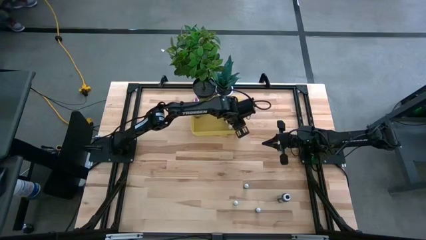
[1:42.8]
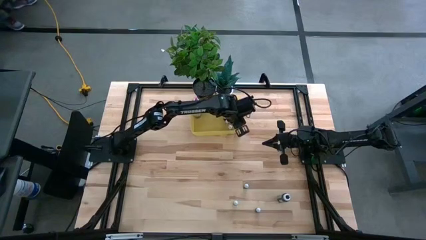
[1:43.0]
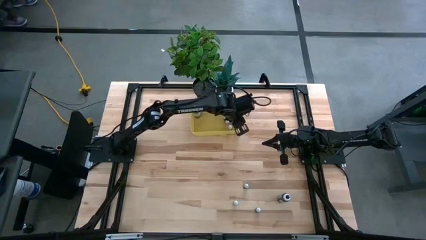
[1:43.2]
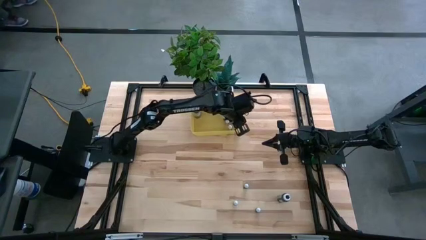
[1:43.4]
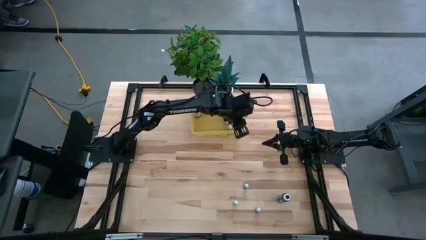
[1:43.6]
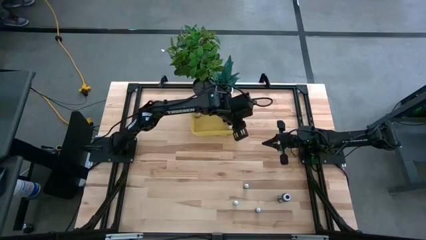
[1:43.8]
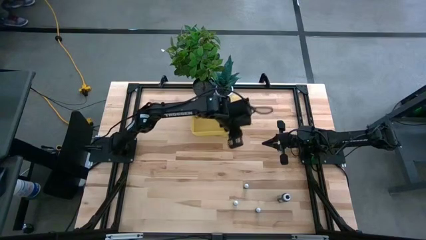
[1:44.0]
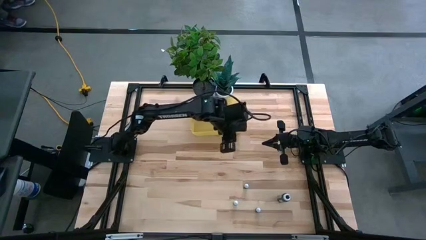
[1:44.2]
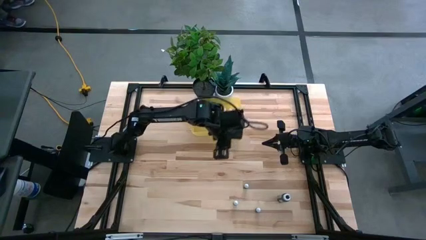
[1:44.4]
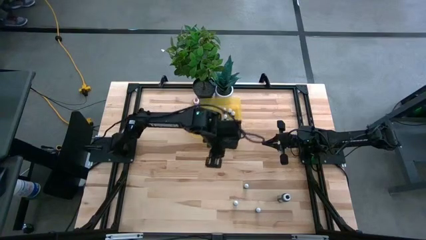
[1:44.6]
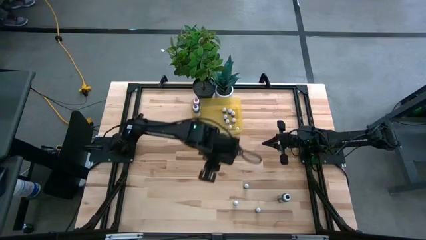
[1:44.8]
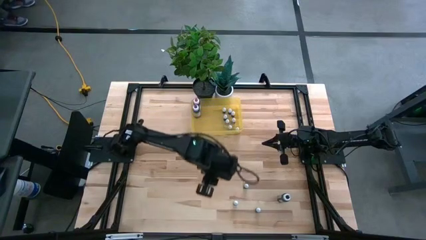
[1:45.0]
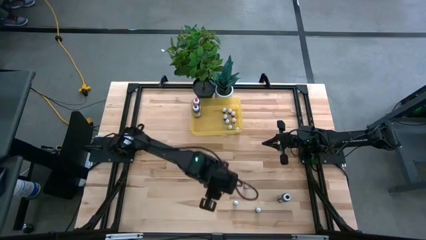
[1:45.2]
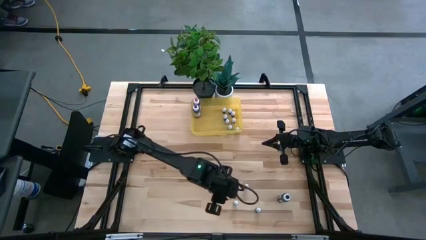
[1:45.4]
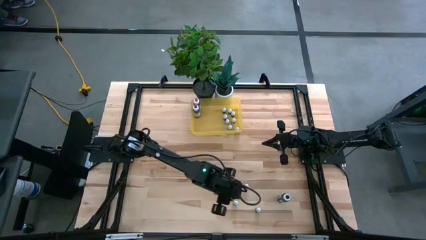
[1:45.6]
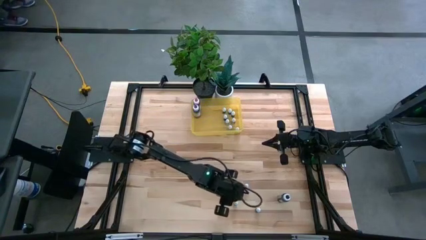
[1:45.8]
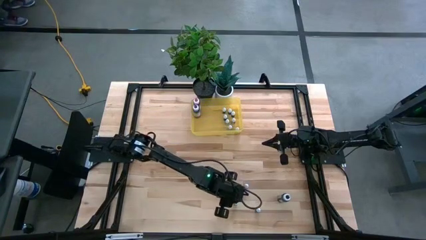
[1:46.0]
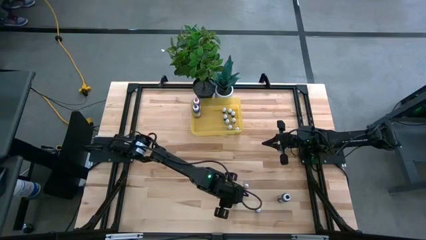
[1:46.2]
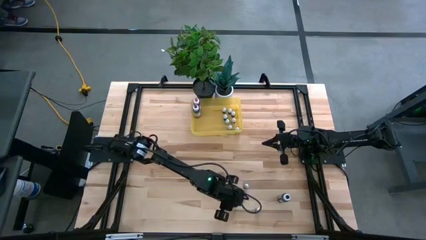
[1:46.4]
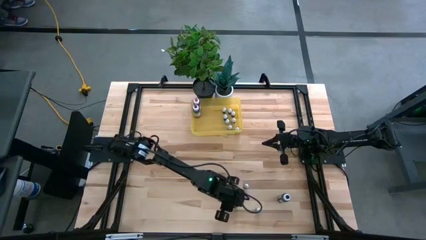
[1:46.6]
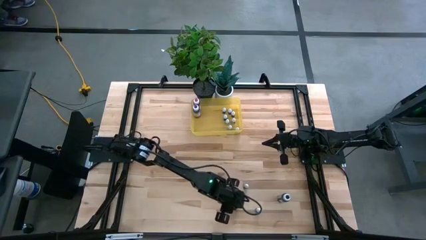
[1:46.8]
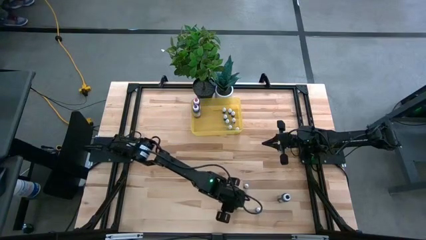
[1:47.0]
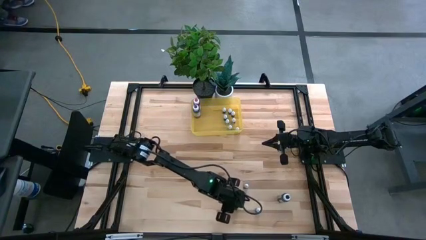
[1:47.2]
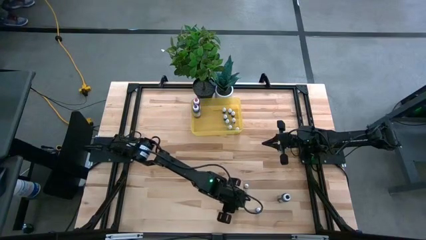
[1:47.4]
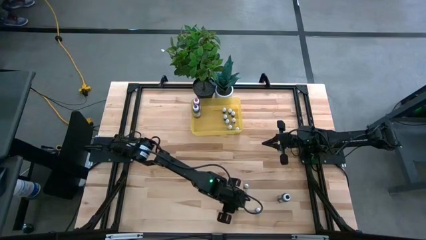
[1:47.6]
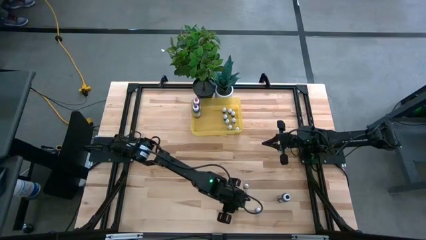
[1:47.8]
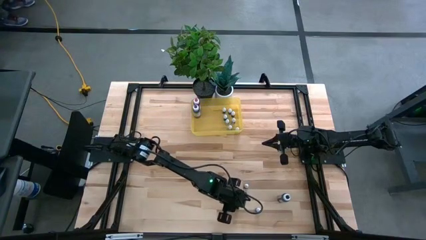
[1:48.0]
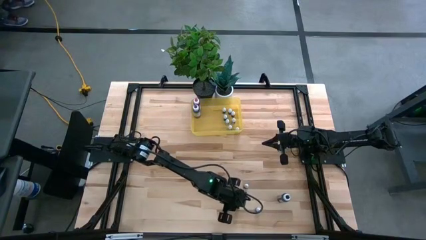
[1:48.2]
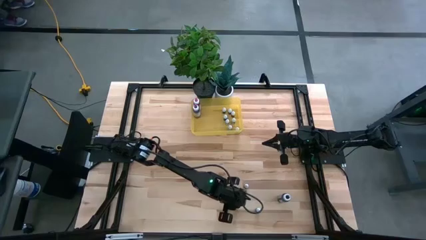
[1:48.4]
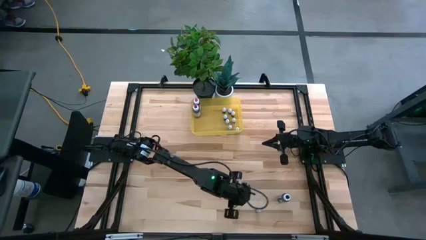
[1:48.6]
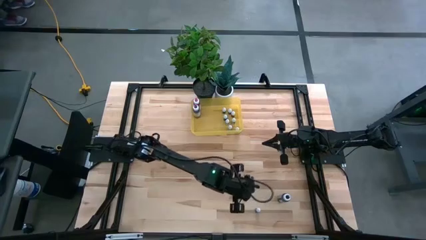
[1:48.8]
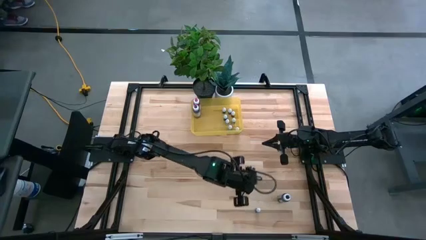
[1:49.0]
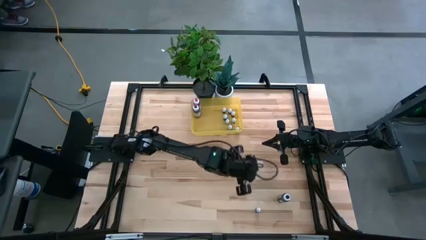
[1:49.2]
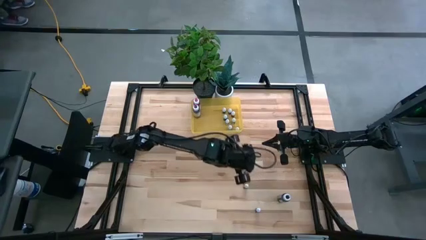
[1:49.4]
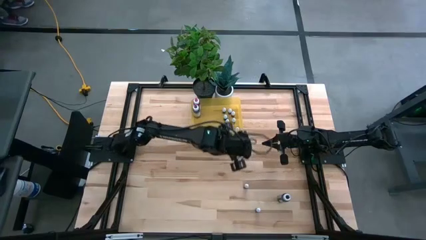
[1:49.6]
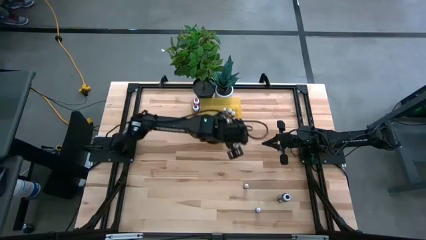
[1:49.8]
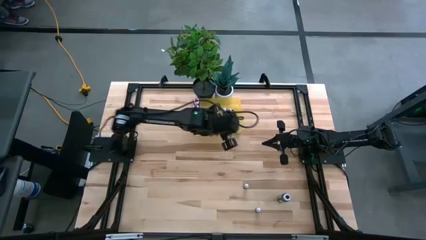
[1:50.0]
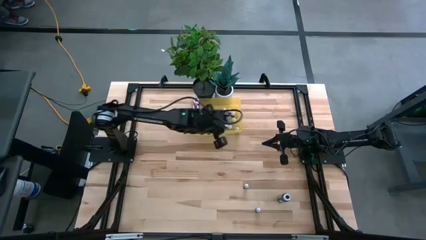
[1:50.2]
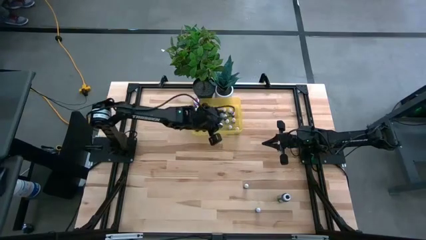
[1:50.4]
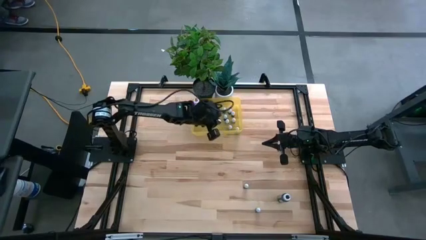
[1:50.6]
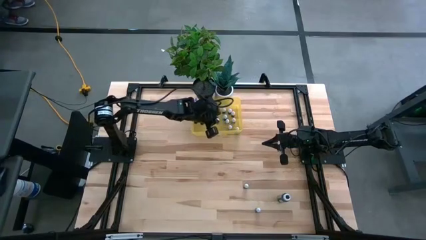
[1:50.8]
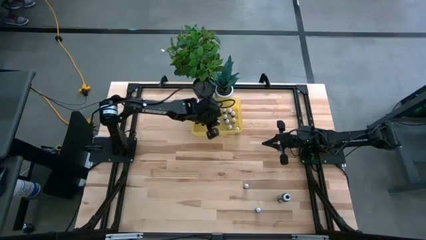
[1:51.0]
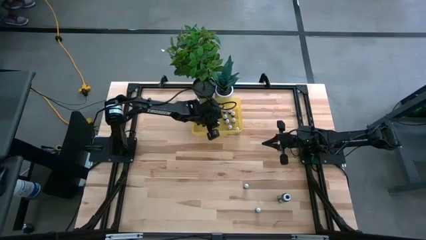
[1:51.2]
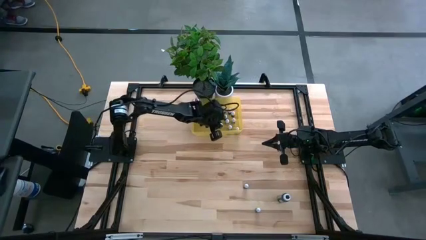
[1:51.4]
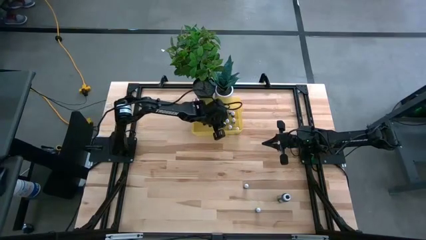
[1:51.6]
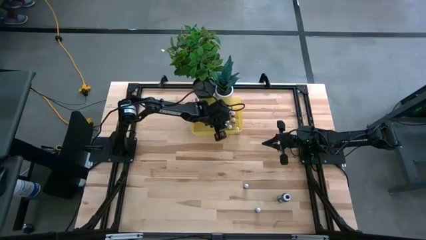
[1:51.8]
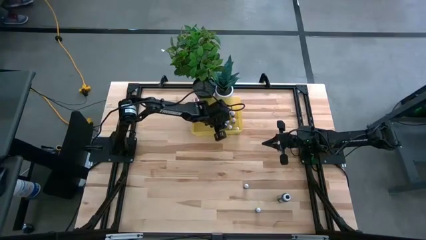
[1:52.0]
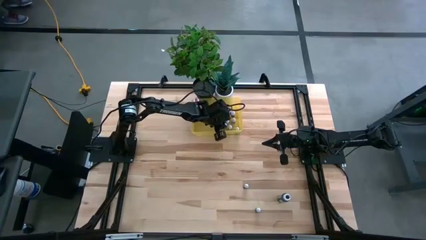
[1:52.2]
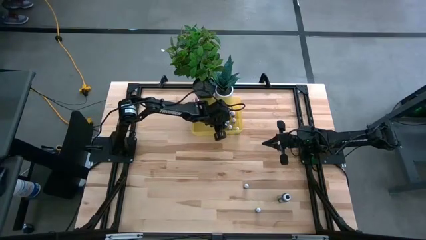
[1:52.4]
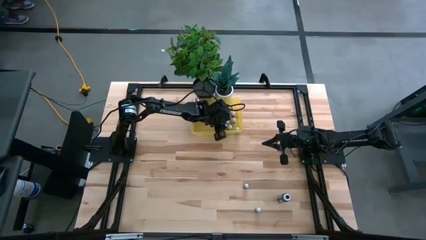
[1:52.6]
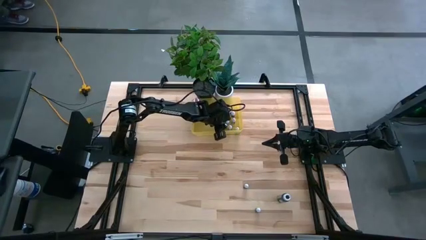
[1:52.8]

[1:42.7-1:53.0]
Task: Pick & Place food coloring
Put the left small green food coloring bottle into the yellow bin

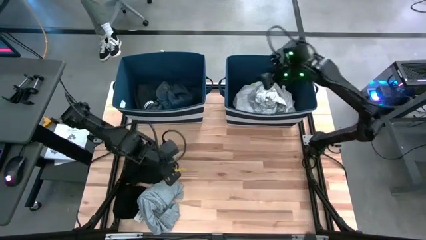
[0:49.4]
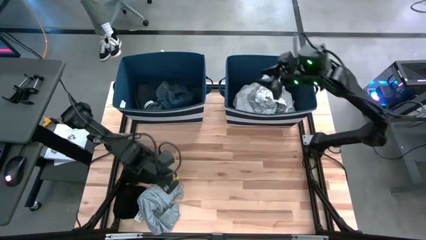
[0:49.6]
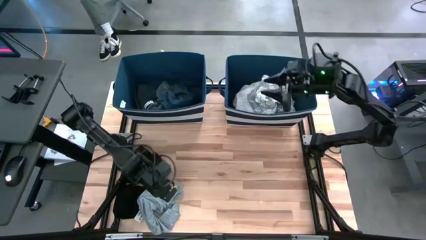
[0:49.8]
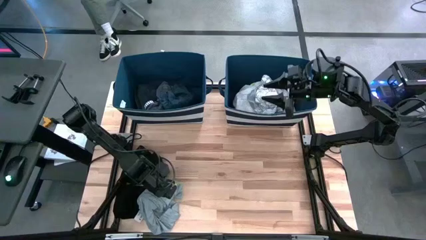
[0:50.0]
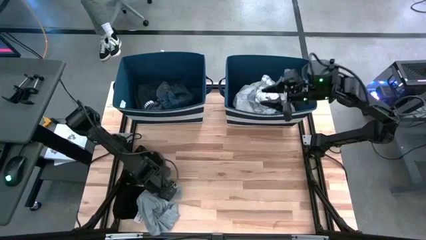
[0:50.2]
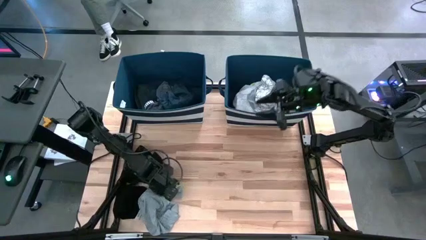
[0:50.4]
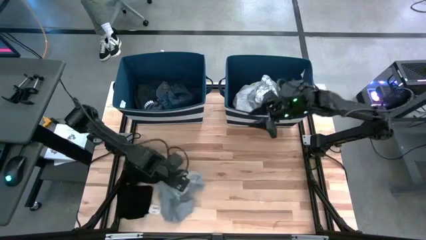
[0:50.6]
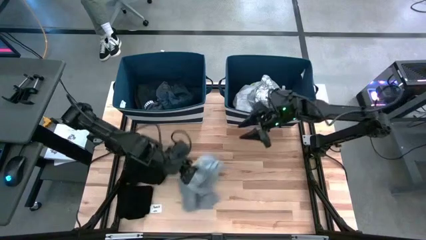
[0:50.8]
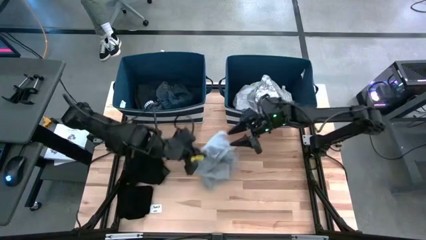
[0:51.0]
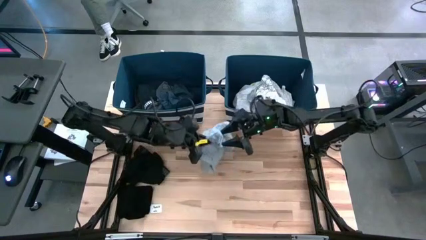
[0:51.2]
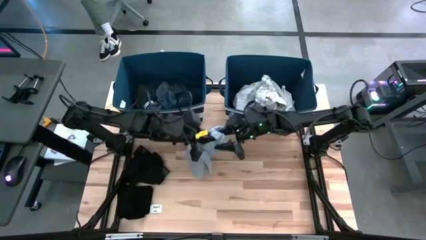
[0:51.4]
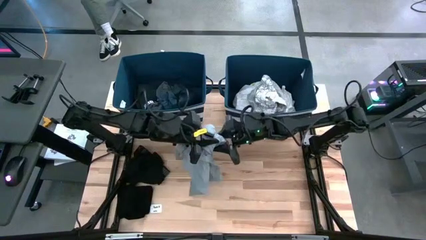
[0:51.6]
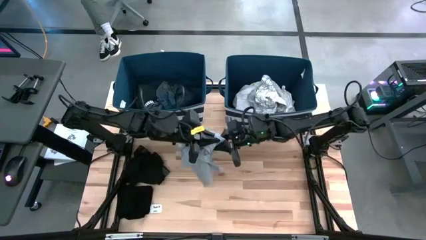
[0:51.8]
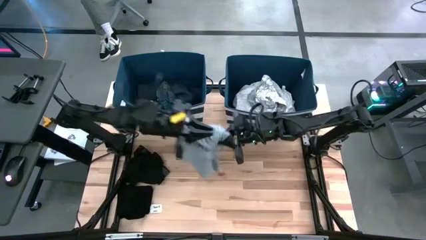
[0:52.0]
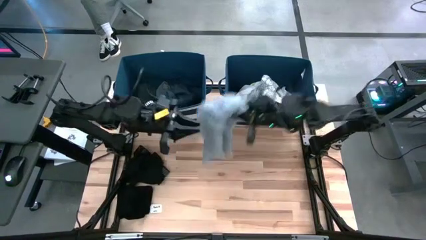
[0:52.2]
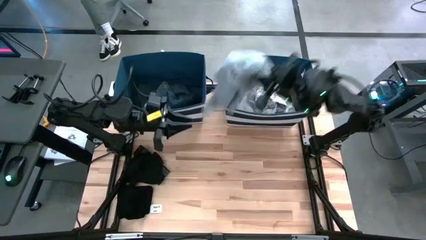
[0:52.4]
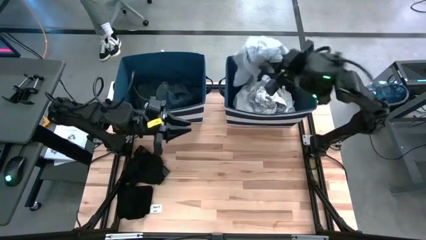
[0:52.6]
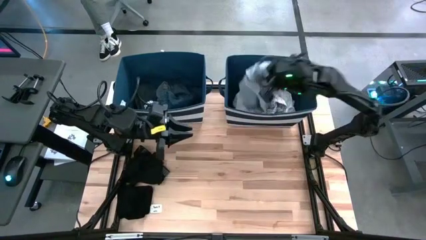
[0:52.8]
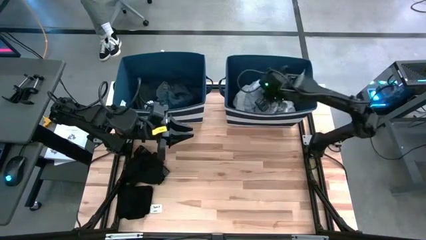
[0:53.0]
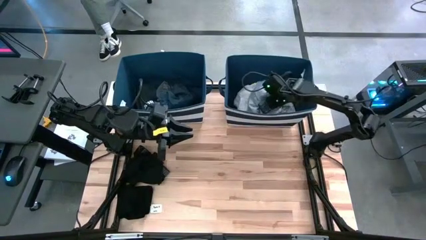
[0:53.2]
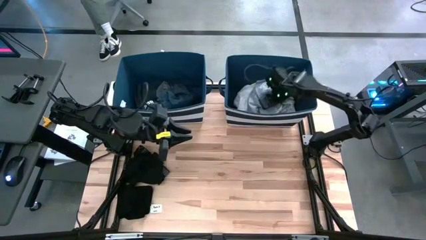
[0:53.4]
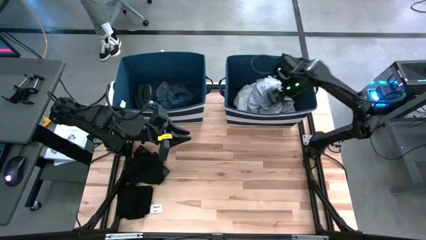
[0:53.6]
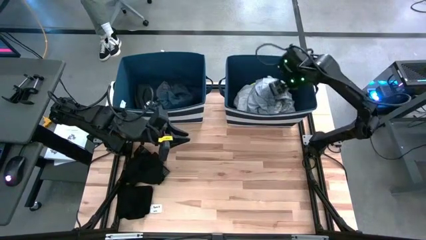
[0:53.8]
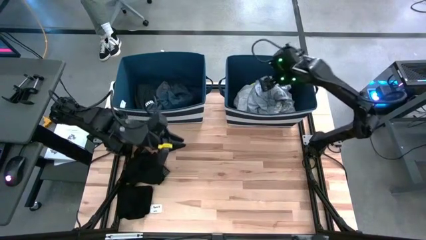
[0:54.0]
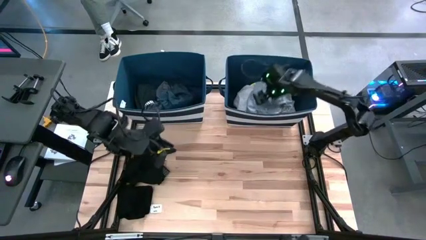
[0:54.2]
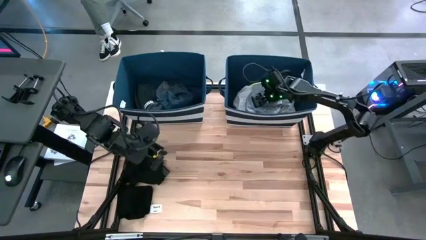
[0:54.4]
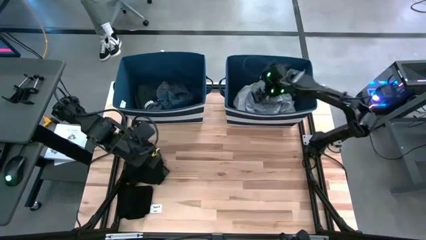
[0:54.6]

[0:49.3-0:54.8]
Task: Sort clothes
Put the gray shirt into the left blue laundry bin

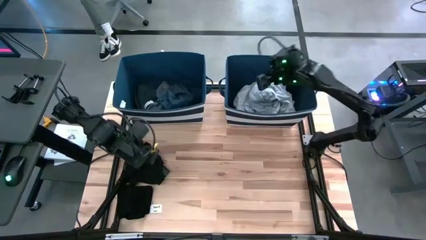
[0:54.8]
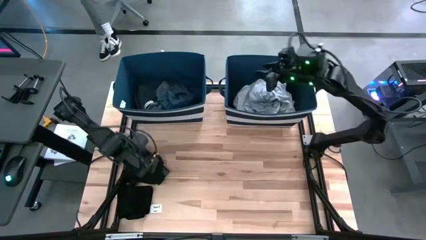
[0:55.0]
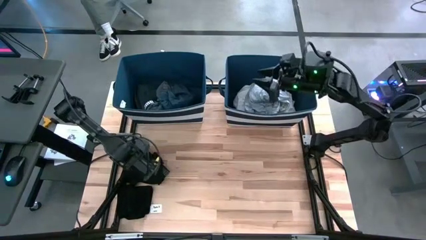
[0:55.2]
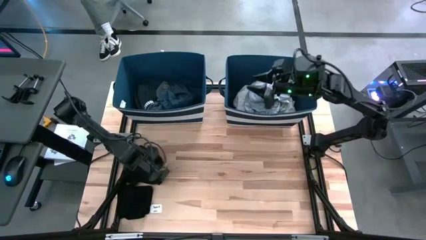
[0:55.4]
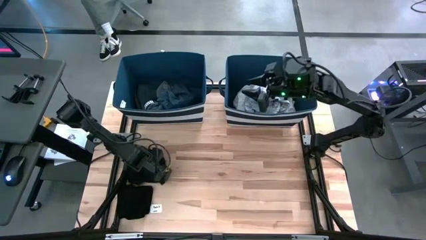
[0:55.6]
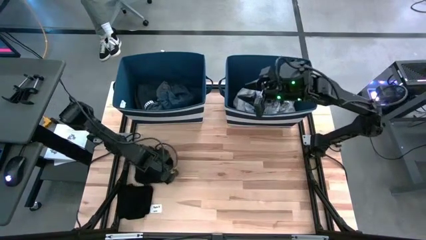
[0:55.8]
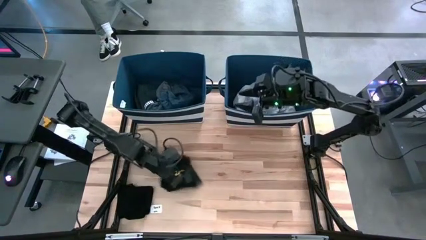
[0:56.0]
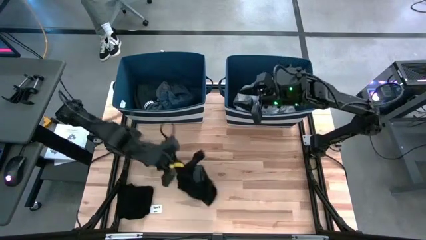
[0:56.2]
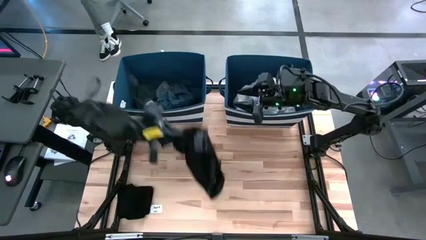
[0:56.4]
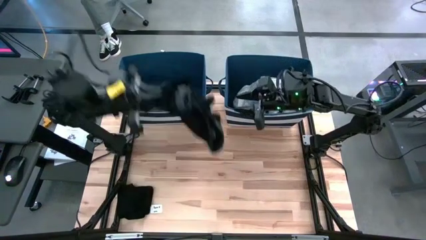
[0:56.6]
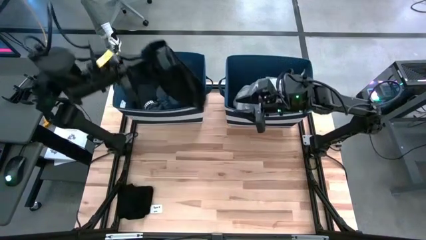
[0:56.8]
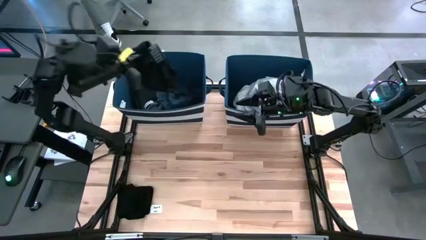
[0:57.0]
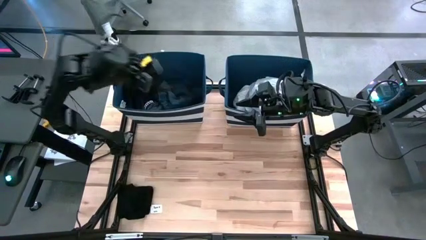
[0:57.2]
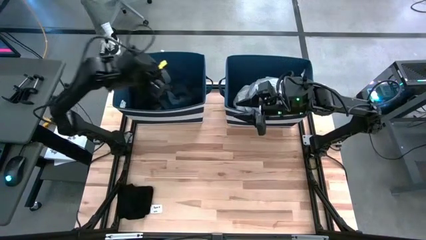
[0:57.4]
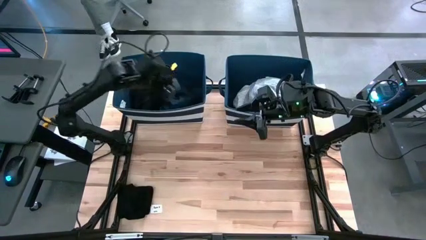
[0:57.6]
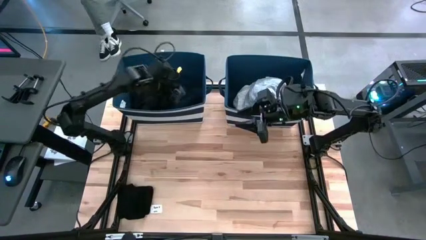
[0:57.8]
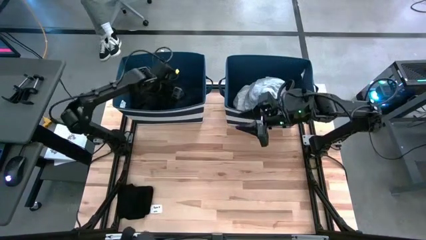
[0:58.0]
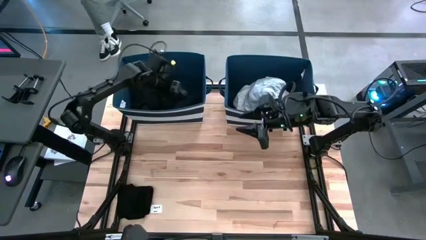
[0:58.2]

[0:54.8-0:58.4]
Put the black underwear into the left blue laundry bin
